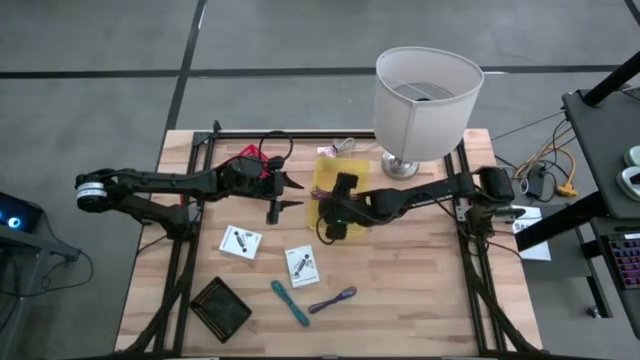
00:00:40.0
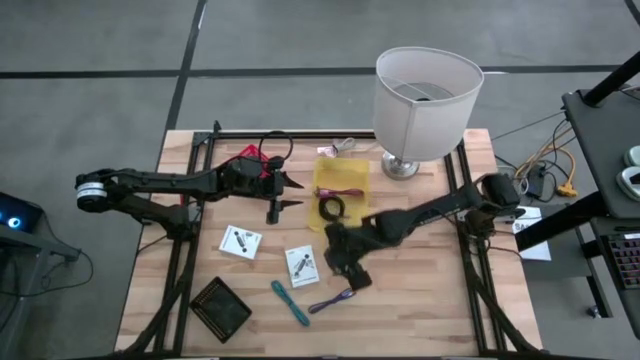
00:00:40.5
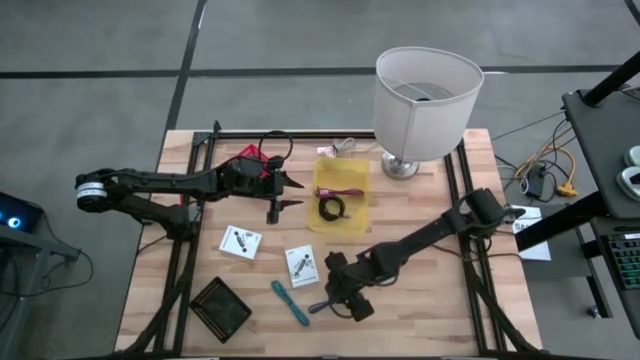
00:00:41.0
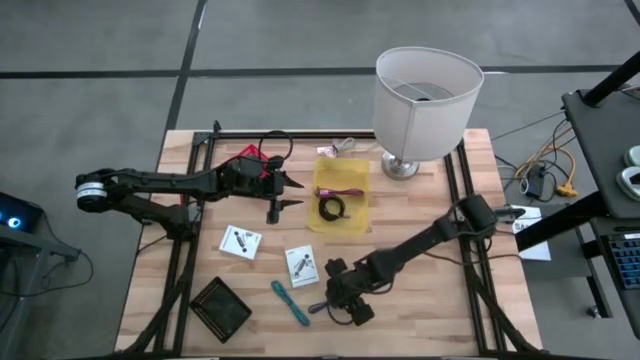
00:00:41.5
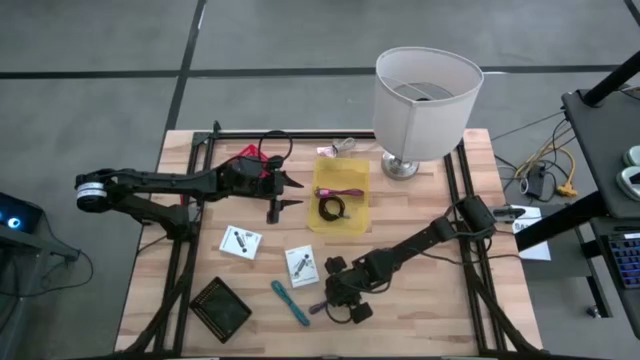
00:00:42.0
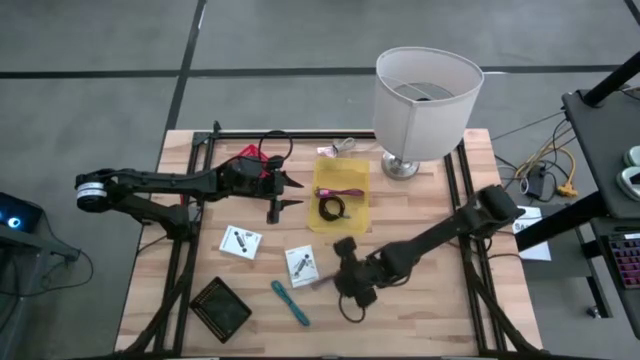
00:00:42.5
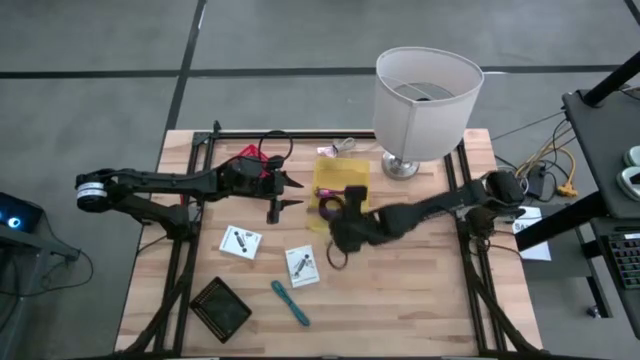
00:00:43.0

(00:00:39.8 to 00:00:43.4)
Task: Pick and place items into bin
Put the violet charger cable into the yellow bin

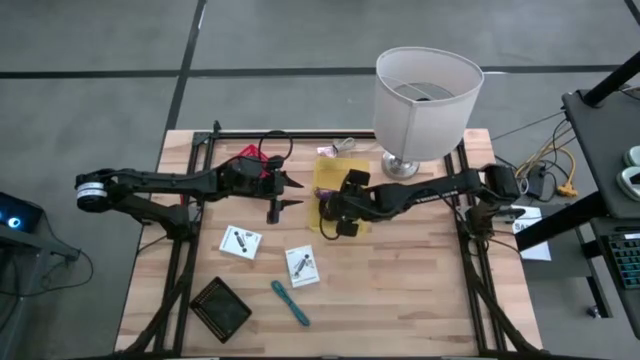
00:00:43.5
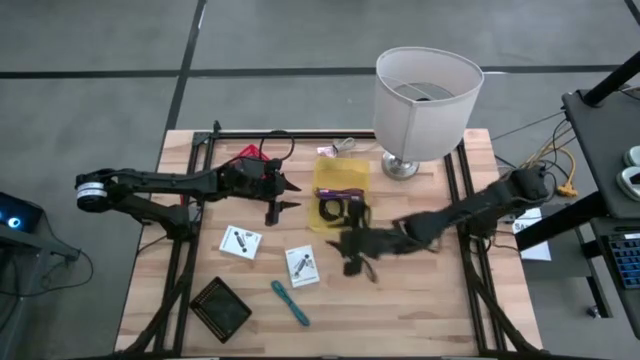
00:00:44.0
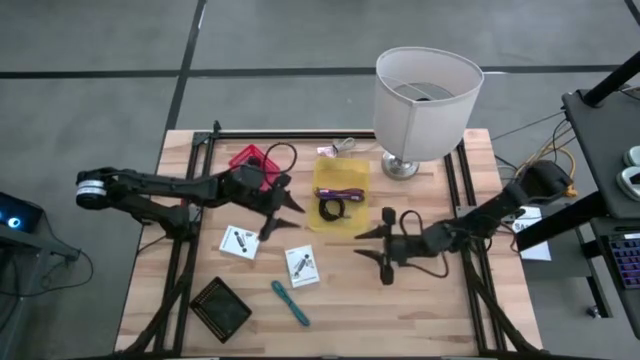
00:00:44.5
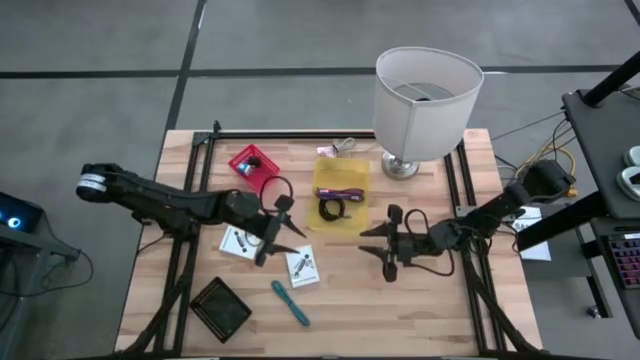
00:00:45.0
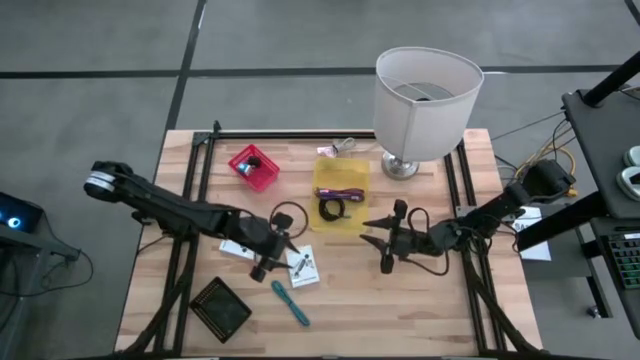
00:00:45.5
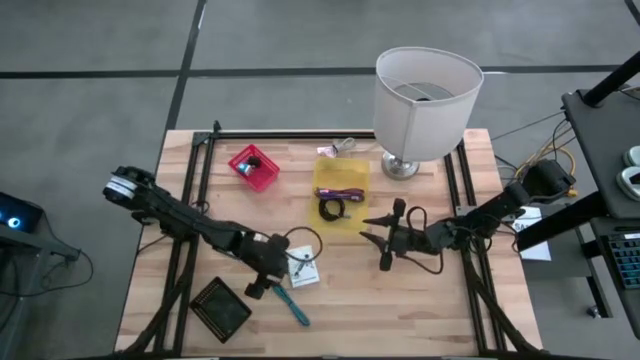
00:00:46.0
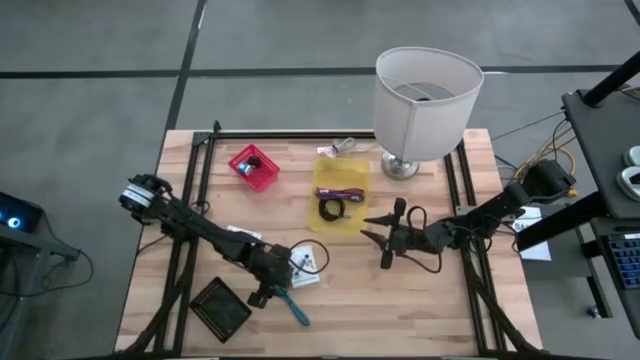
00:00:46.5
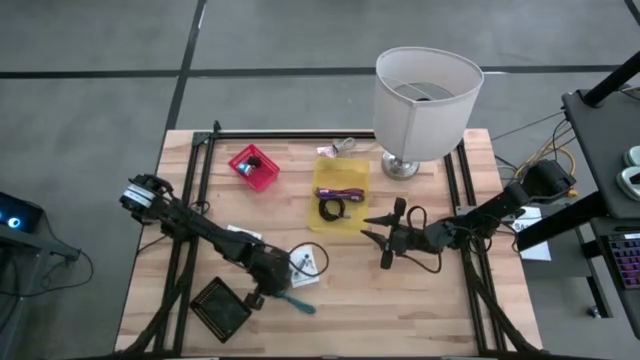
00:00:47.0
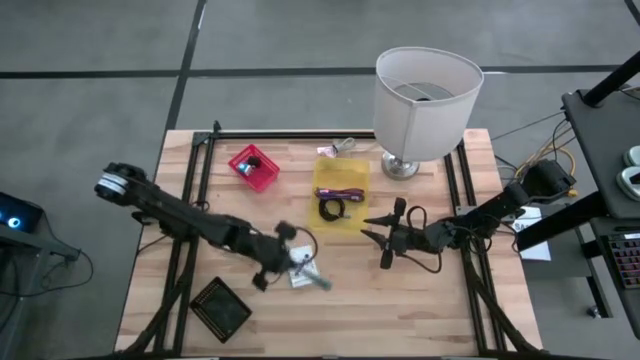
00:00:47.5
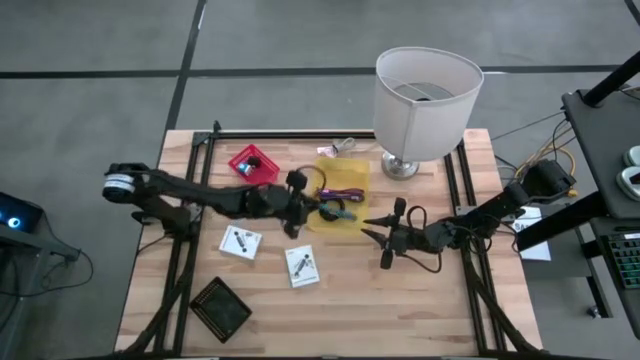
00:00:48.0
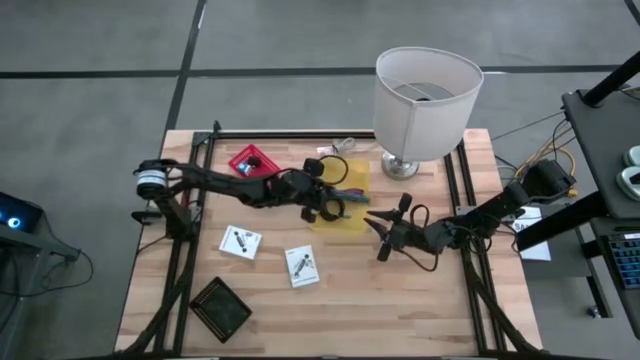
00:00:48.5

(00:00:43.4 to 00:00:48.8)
Put the blue charger cable into the yellow bin

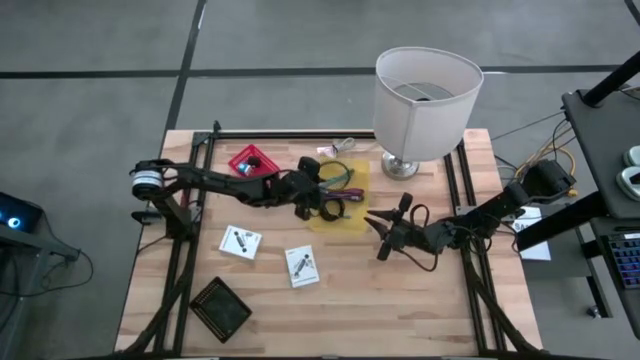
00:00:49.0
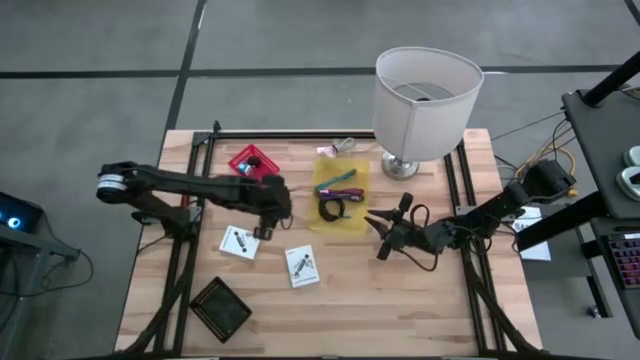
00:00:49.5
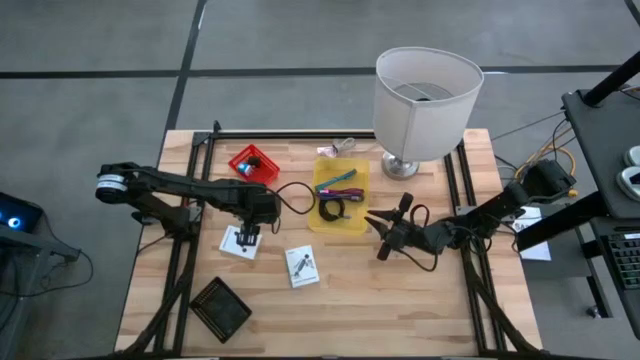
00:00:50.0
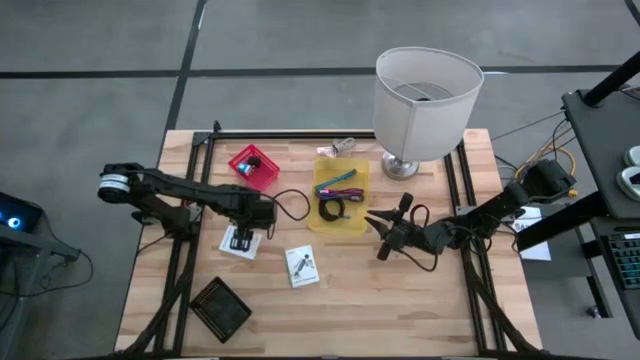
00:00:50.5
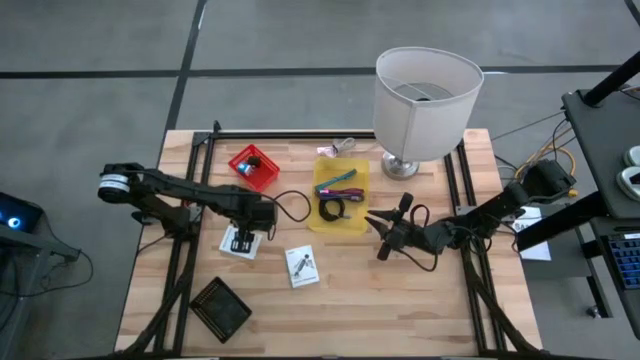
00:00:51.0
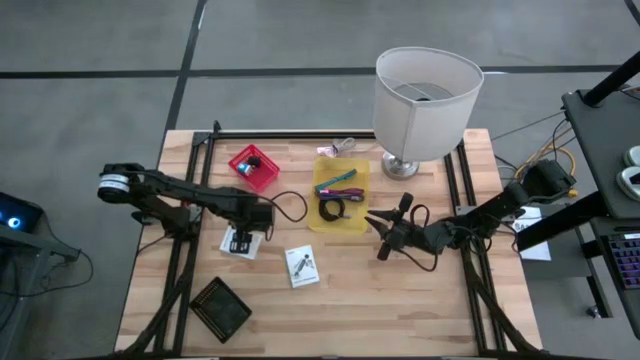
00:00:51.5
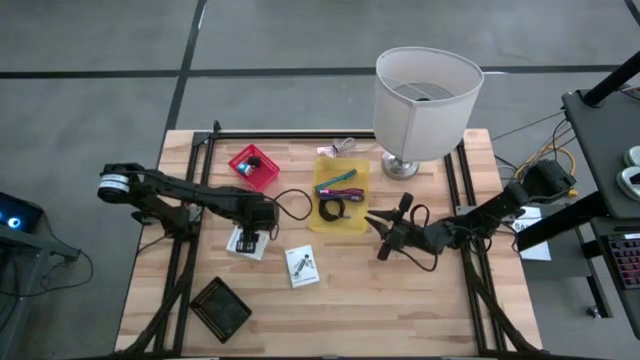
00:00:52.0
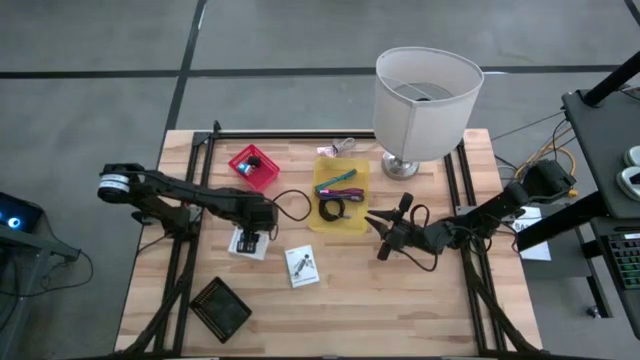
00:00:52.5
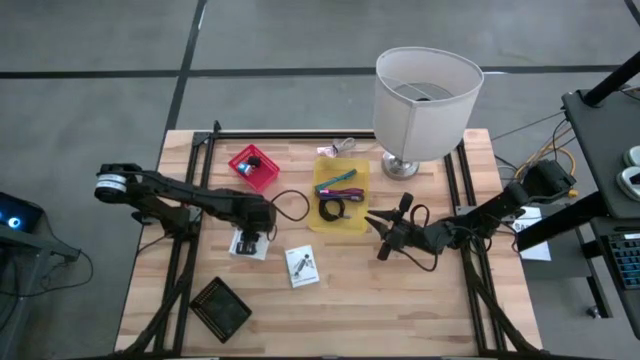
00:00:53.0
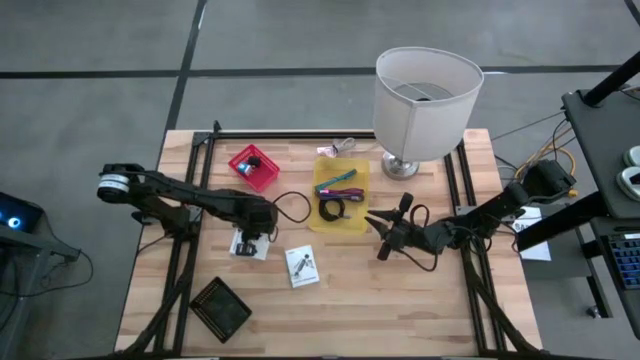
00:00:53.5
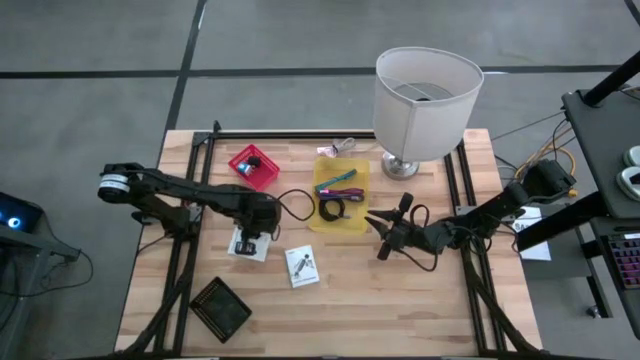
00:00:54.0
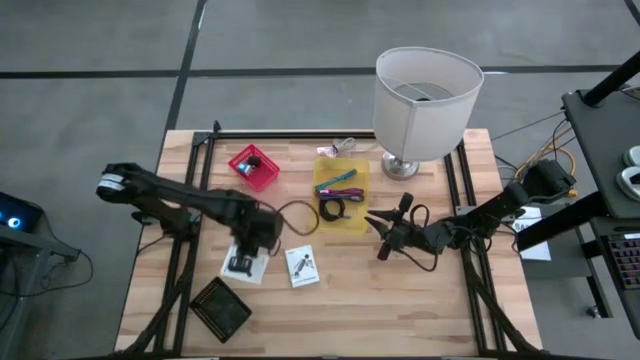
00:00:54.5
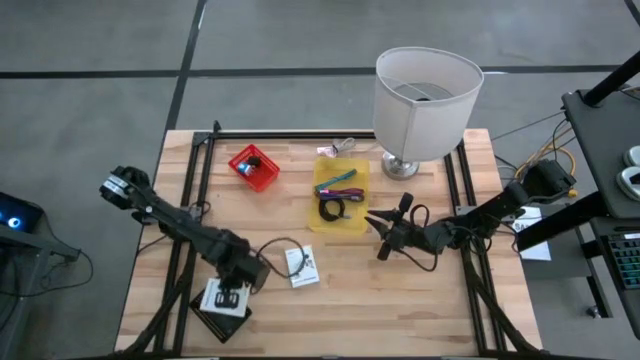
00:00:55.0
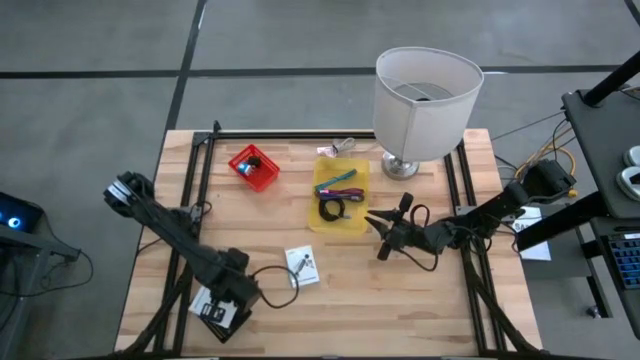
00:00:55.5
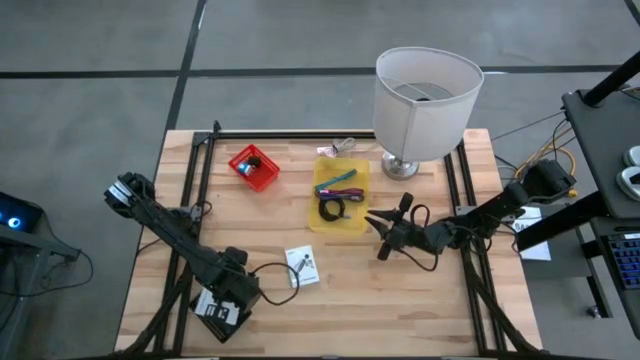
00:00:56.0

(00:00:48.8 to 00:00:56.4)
Put the left white card reader box into the black bin

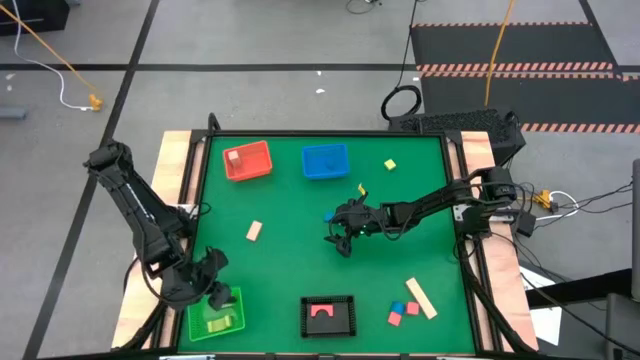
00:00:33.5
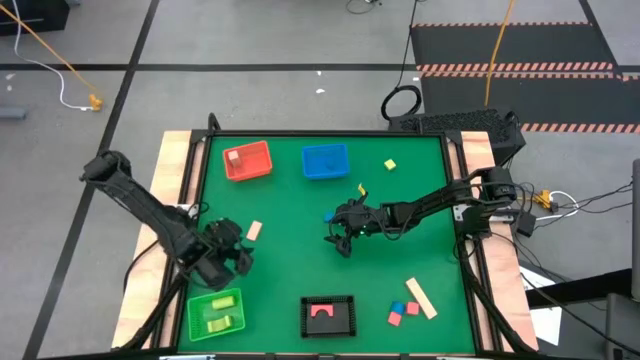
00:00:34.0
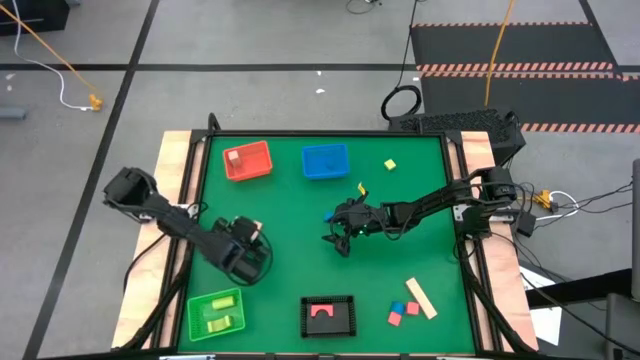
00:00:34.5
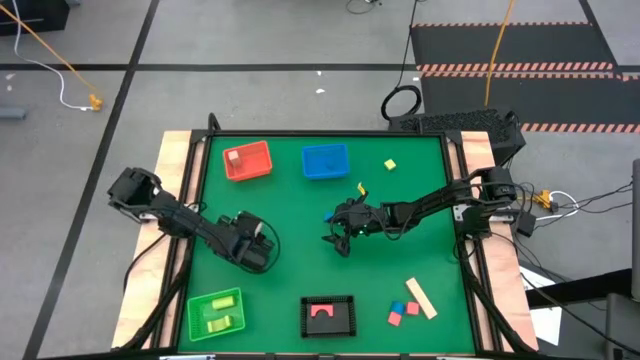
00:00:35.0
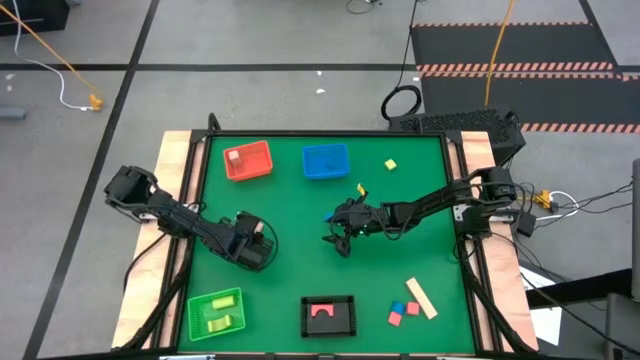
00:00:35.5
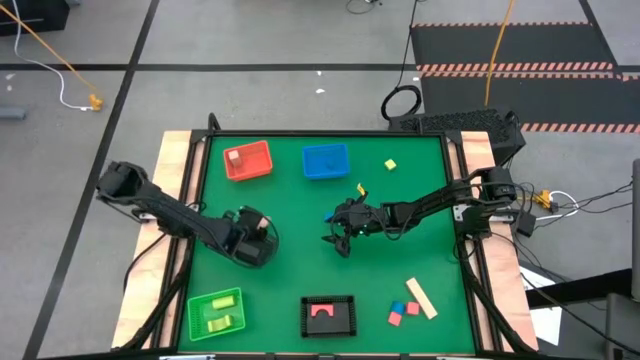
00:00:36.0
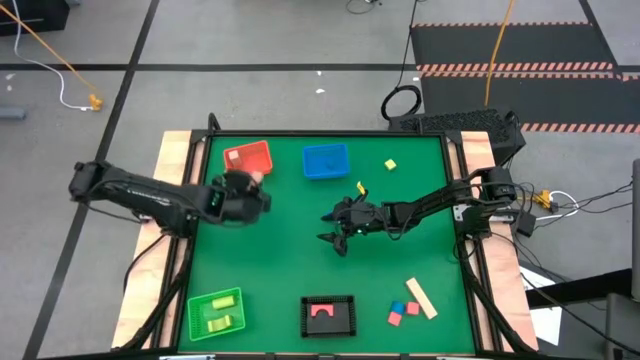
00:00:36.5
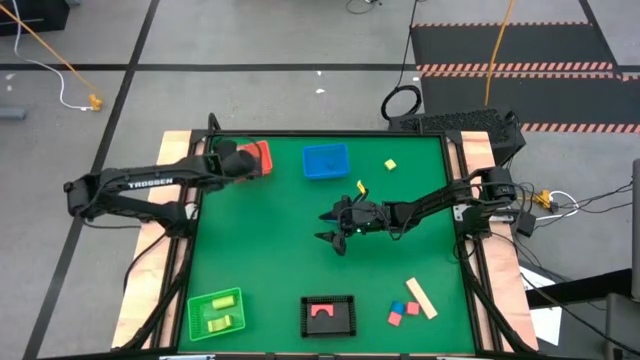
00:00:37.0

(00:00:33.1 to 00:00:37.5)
Task: Sort & place blocks by color
Put the top light brown block into the orange bin
